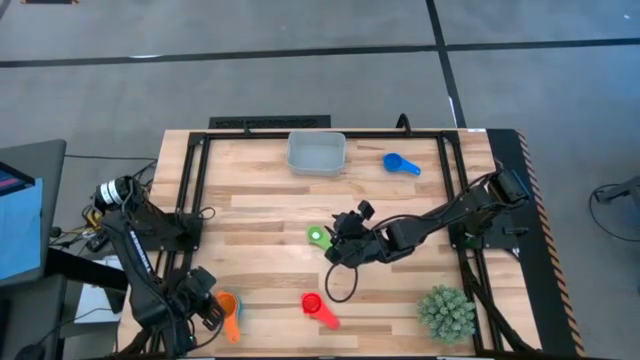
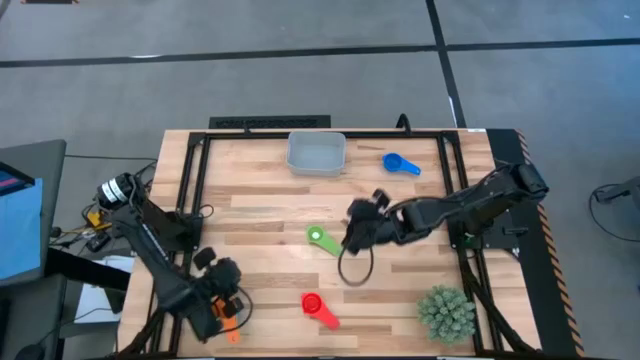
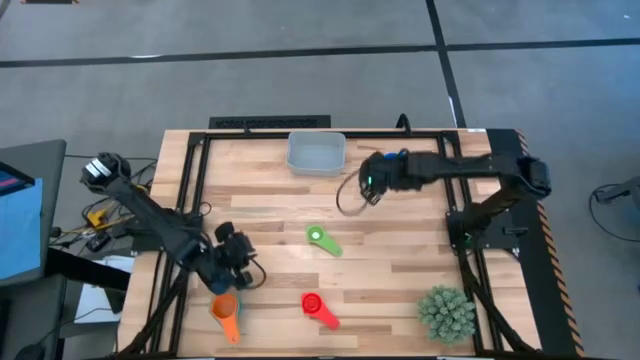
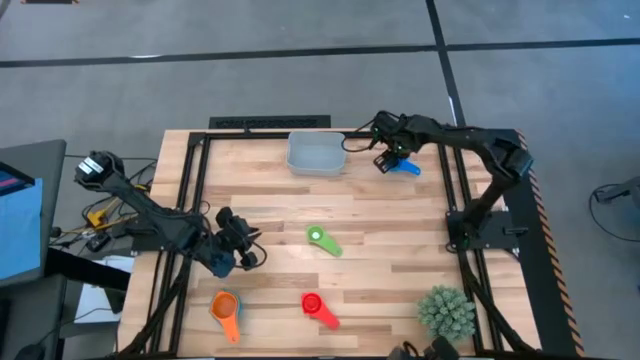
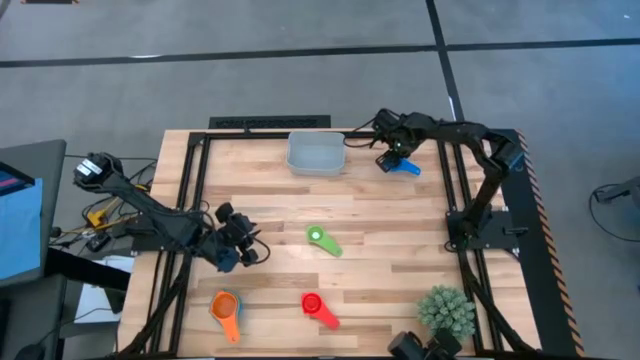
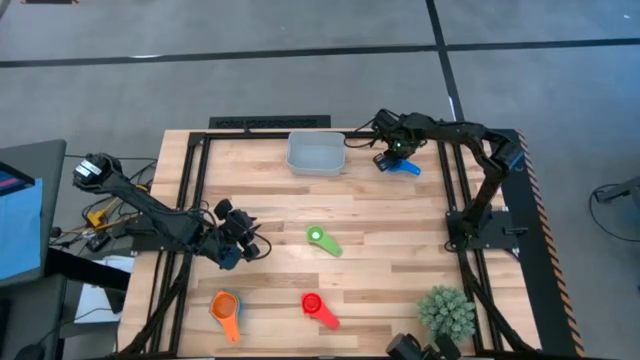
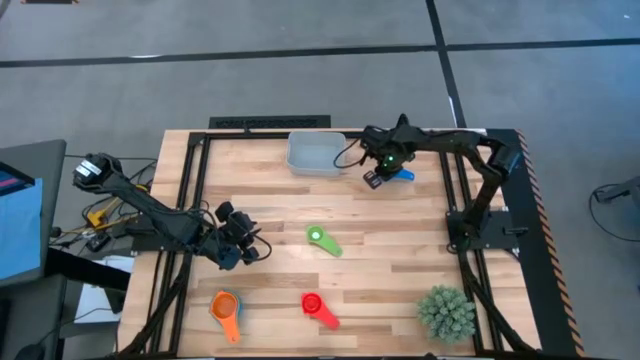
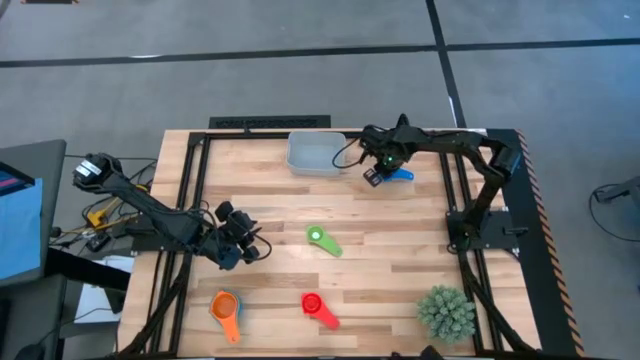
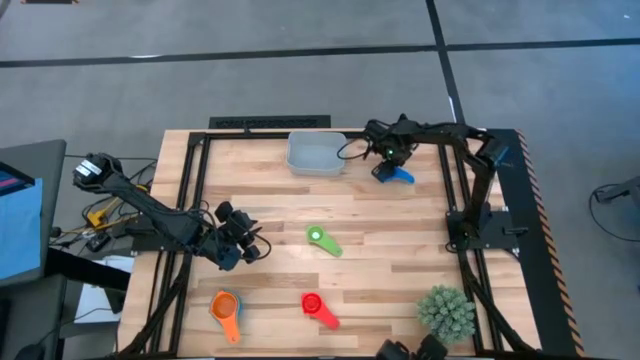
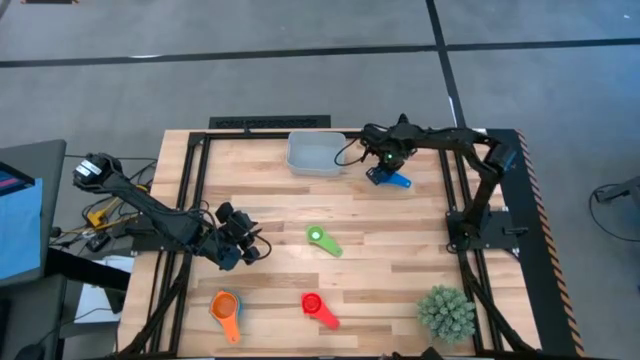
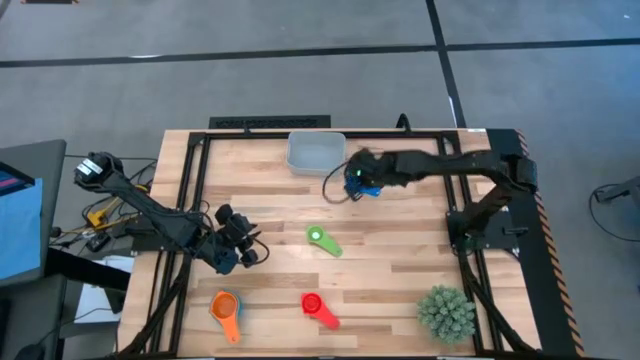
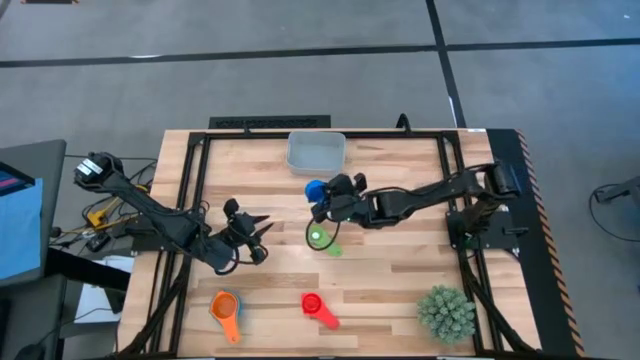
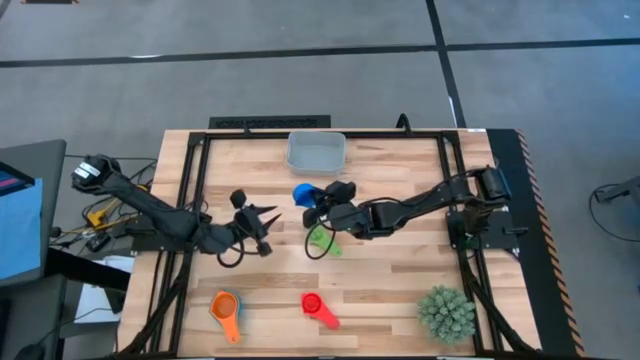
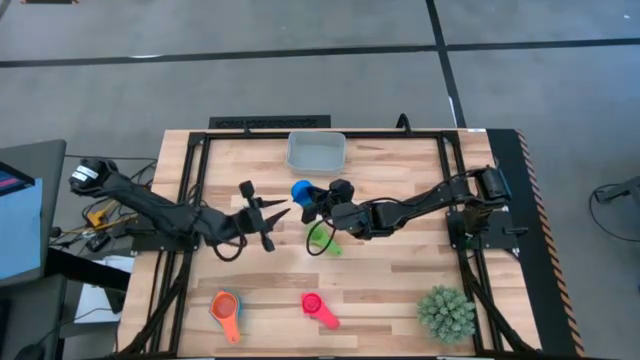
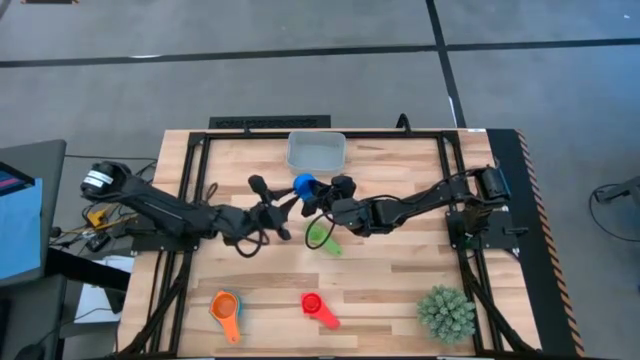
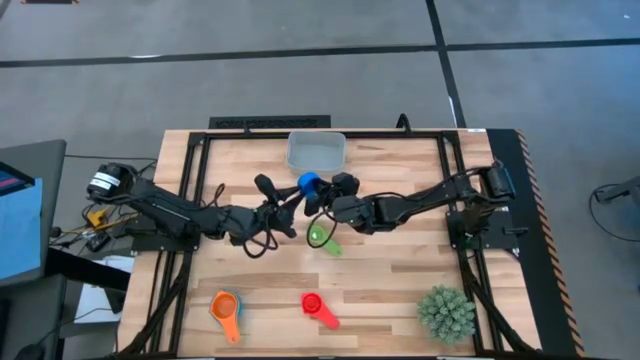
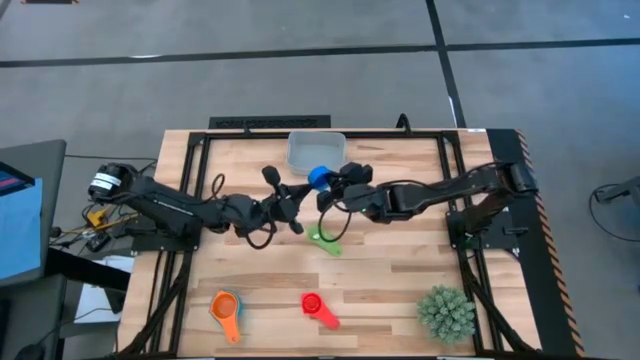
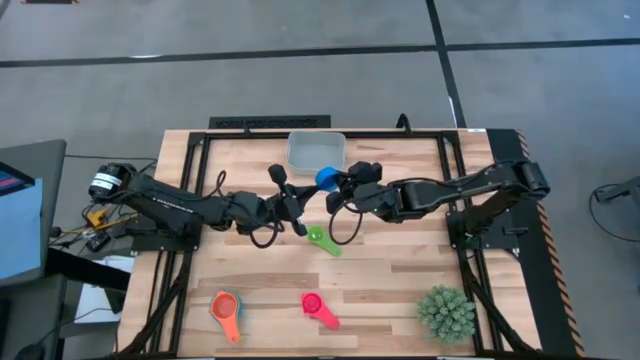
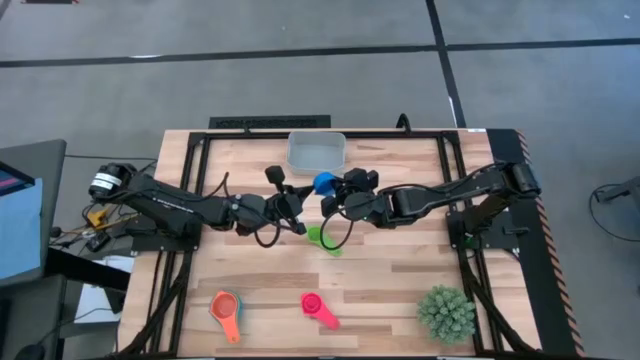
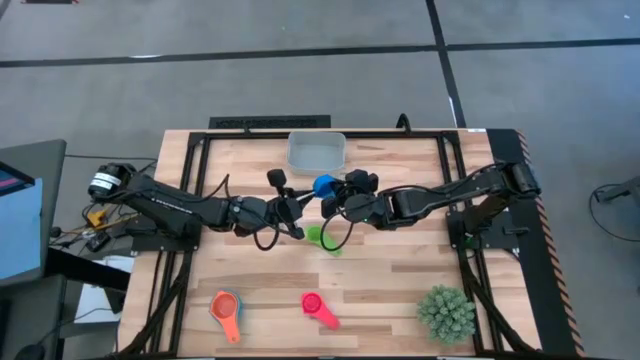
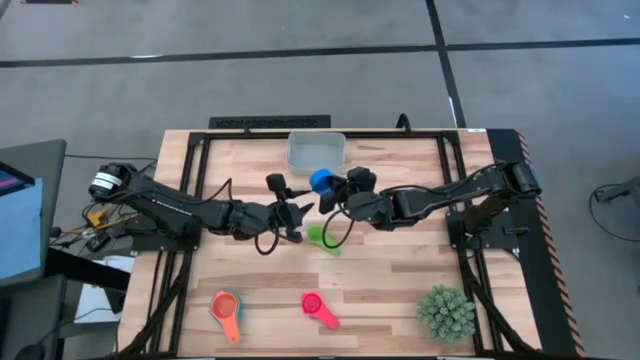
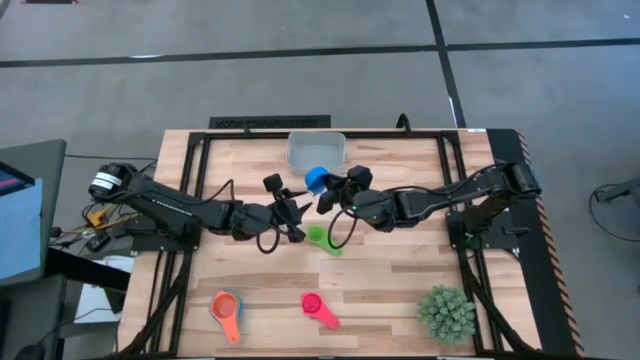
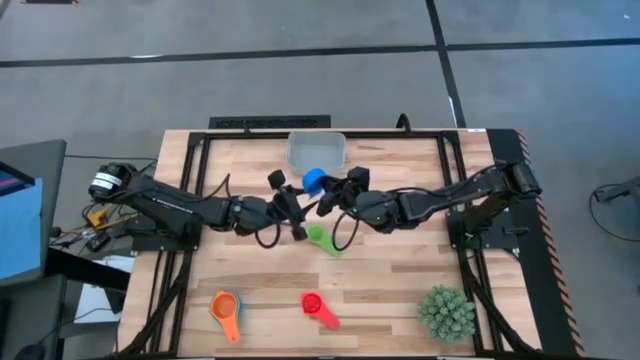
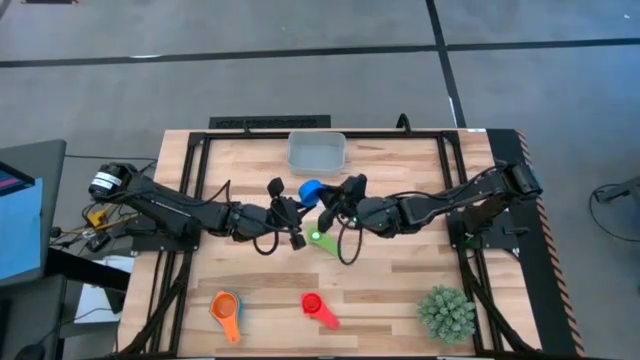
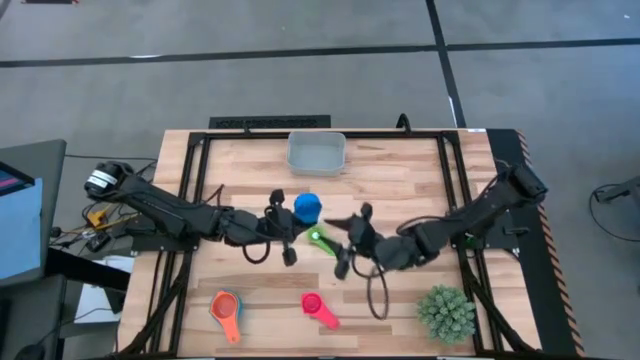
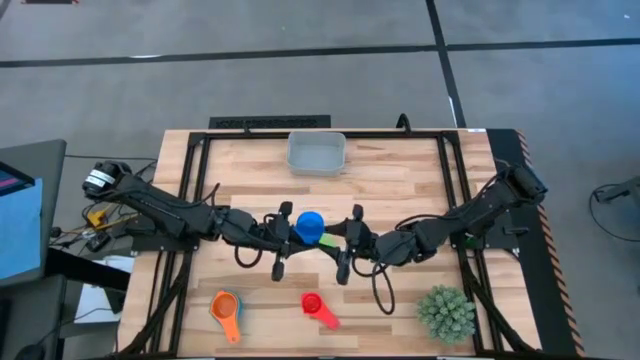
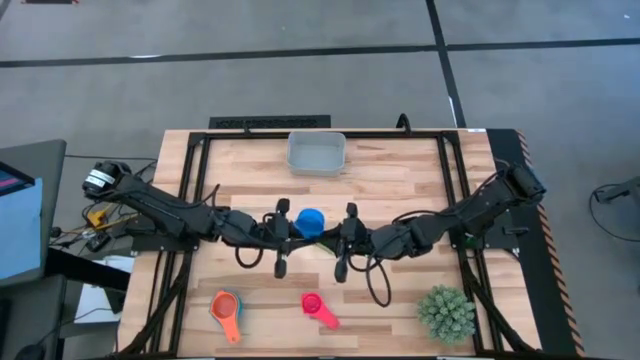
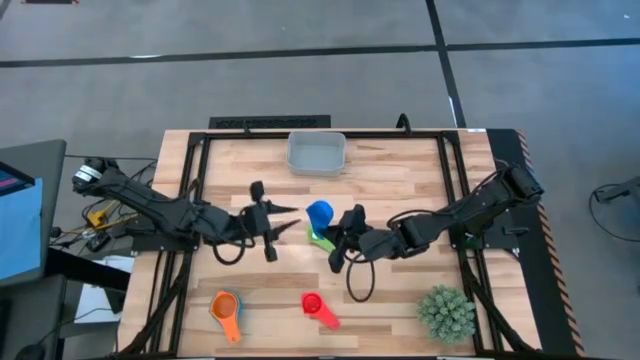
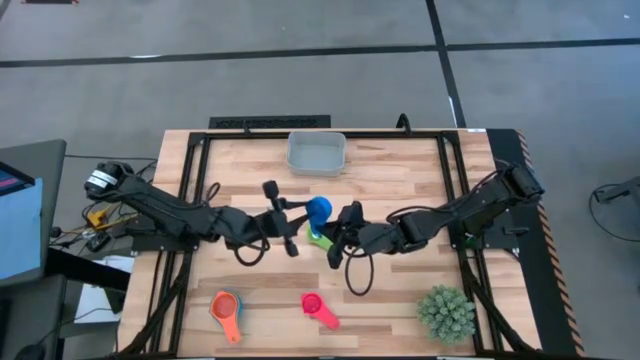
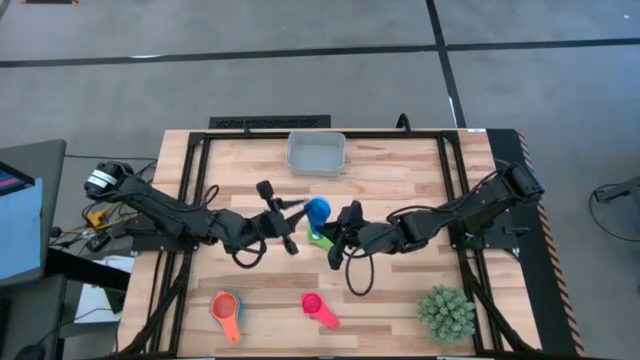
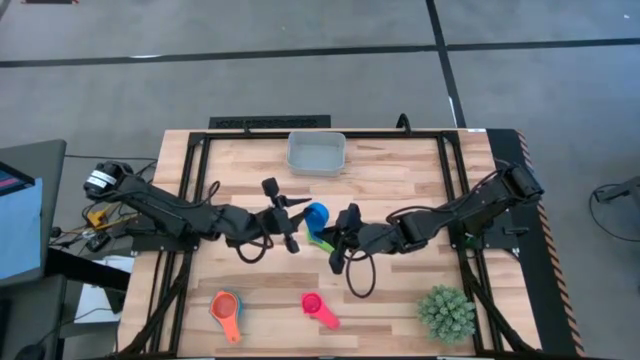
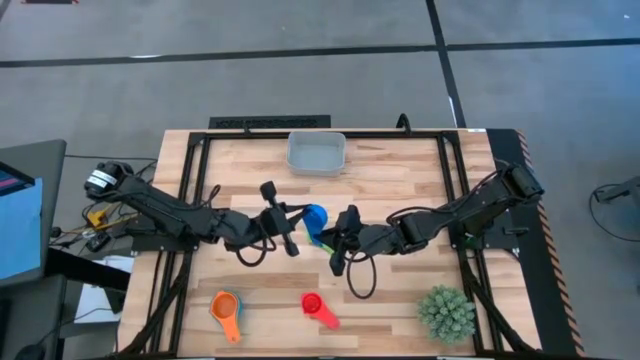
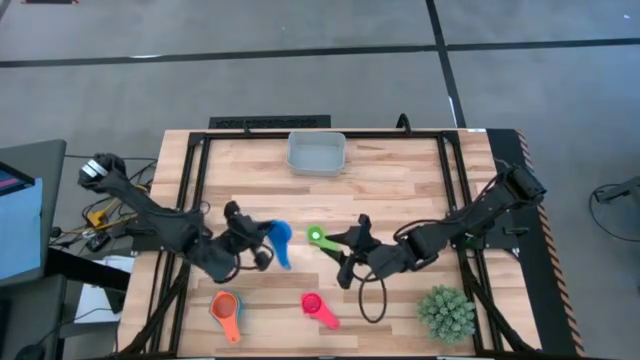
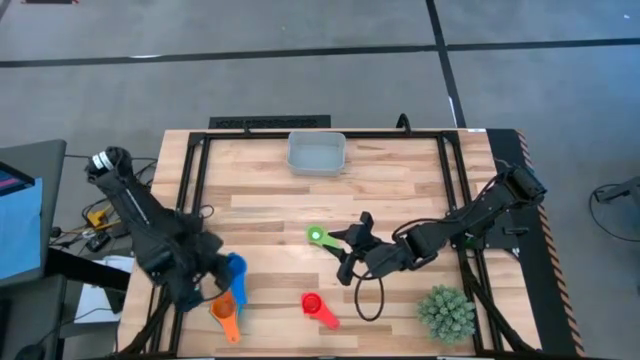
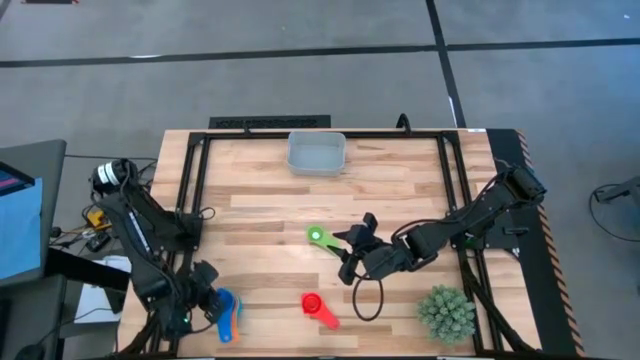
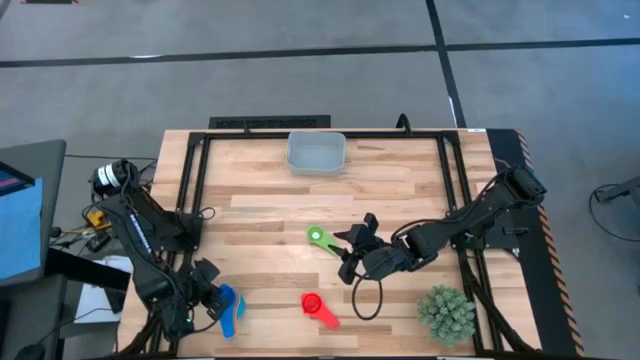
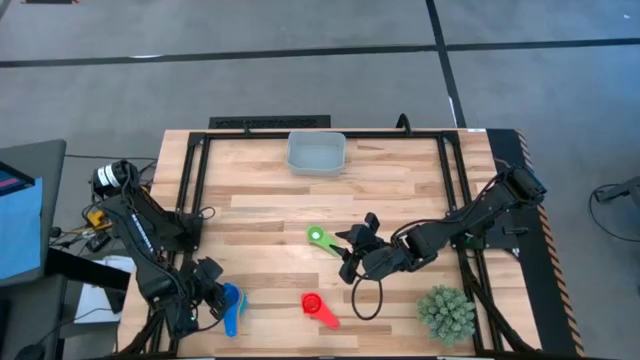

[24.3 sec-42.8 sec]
Task: Nest measuring cups in basket
Stack the blue measuring cup on top of the orange measuring cup

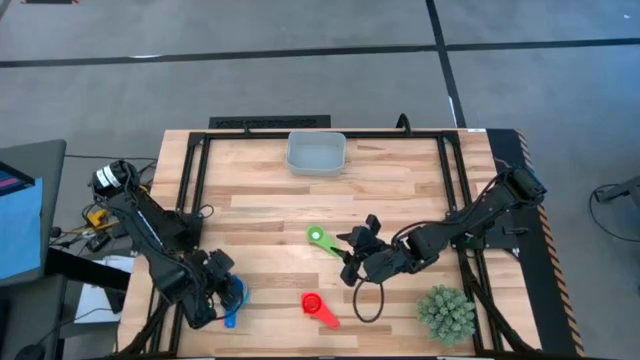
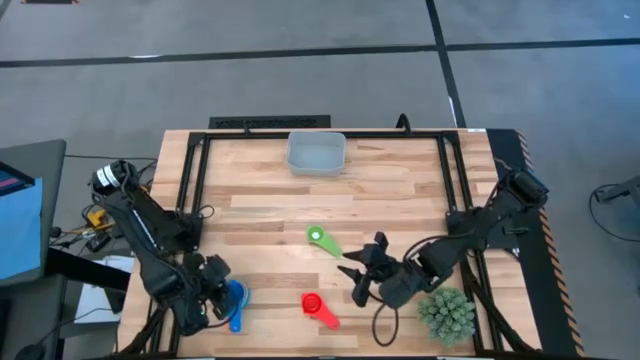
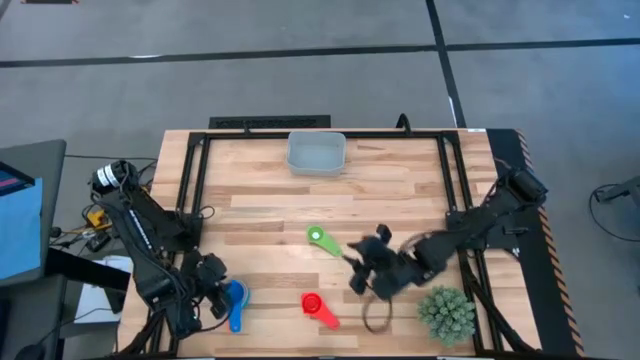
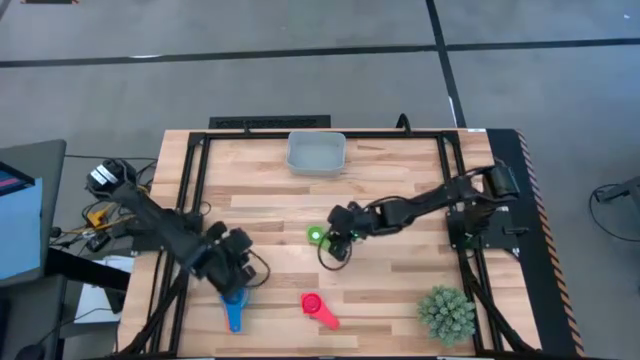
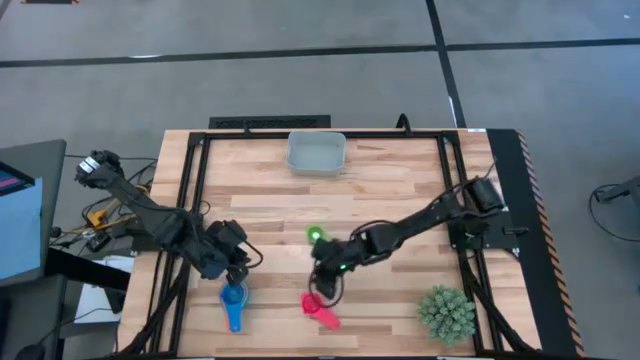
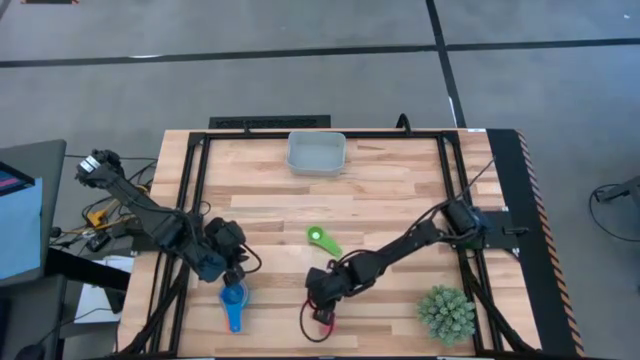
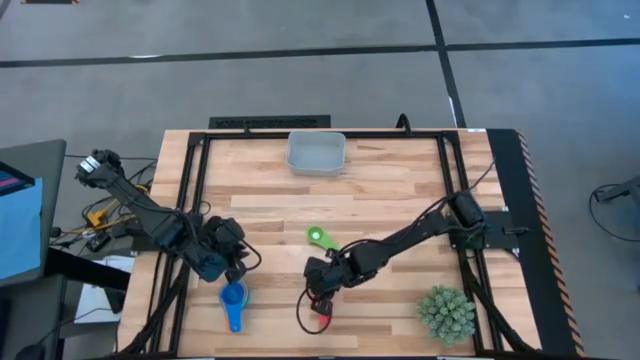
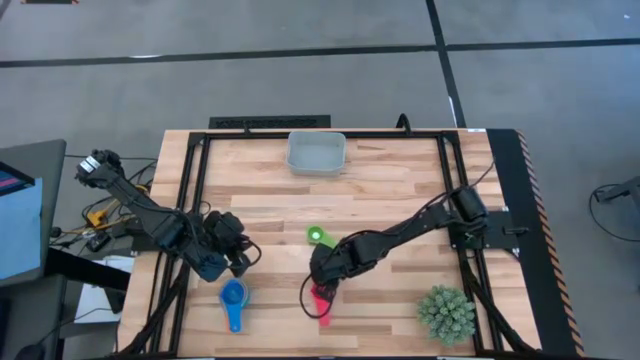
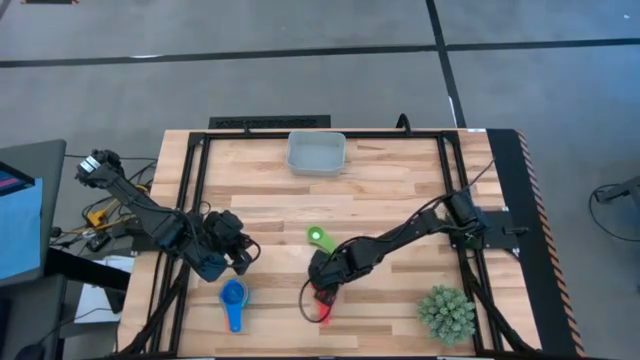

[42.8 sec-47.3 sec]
Stack the red measuring cup on top of the blue measuring cup
